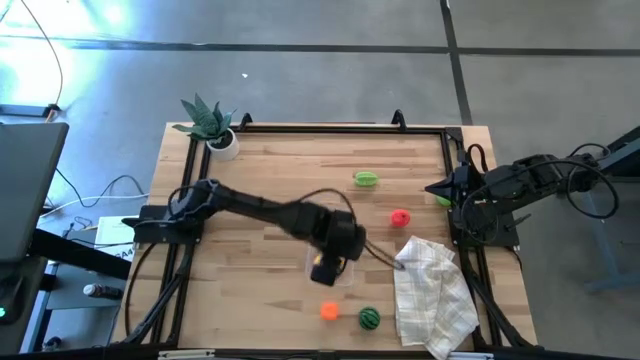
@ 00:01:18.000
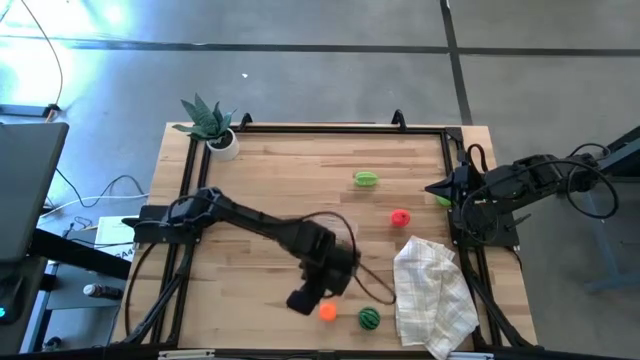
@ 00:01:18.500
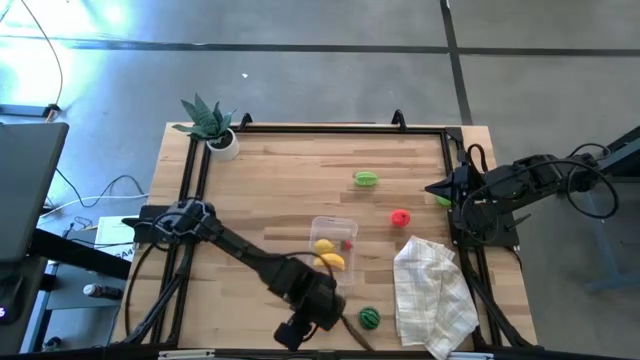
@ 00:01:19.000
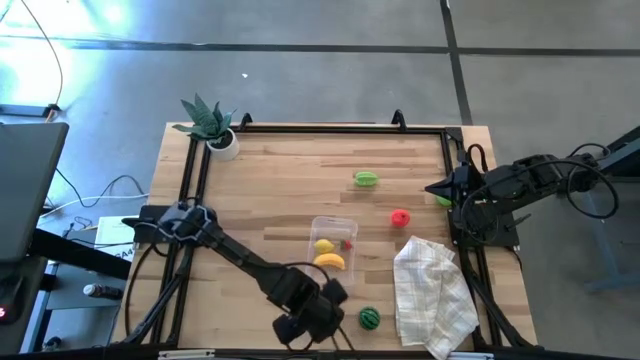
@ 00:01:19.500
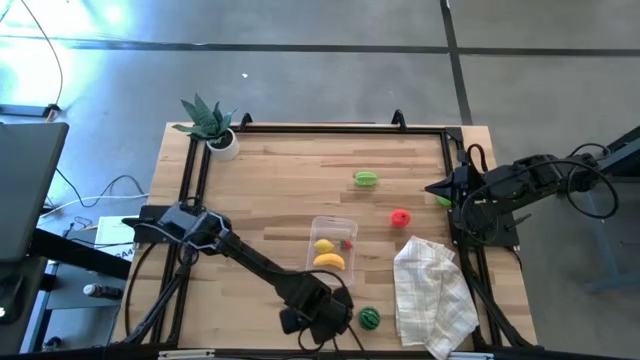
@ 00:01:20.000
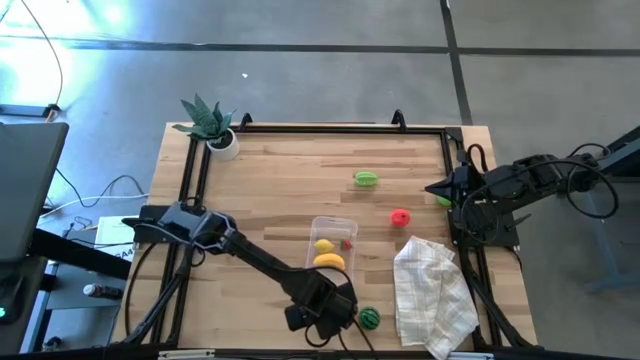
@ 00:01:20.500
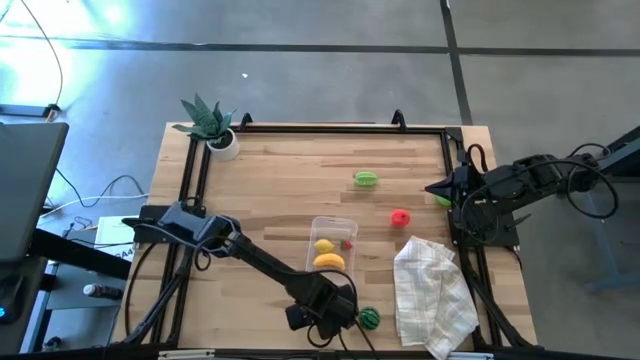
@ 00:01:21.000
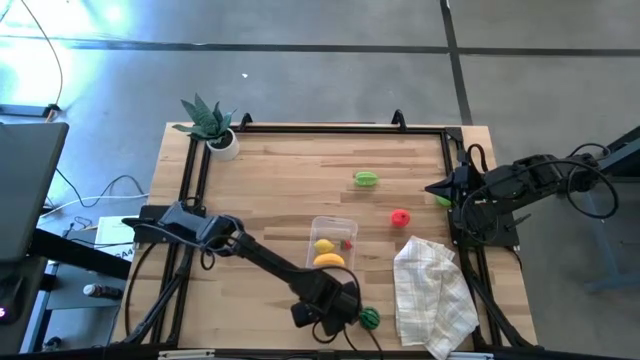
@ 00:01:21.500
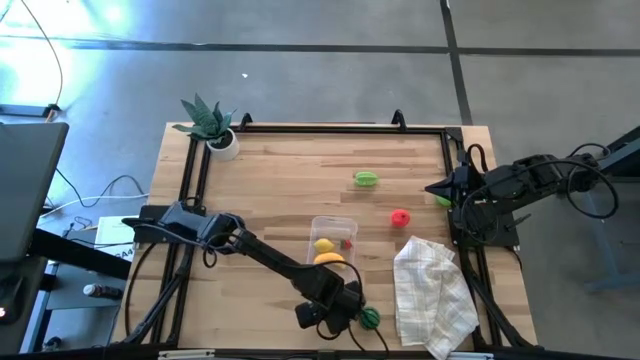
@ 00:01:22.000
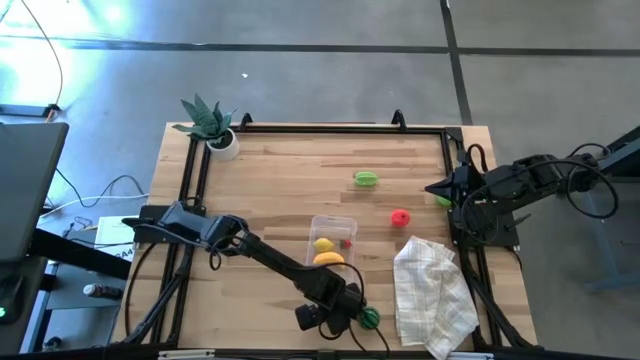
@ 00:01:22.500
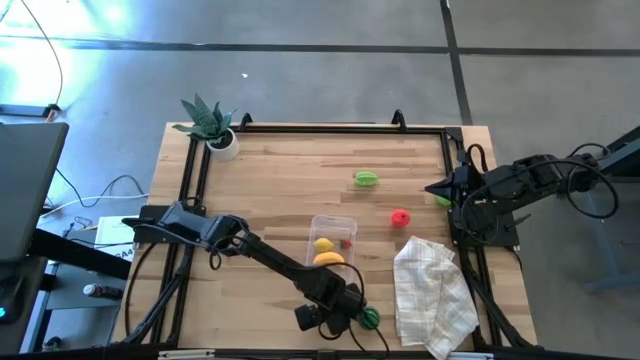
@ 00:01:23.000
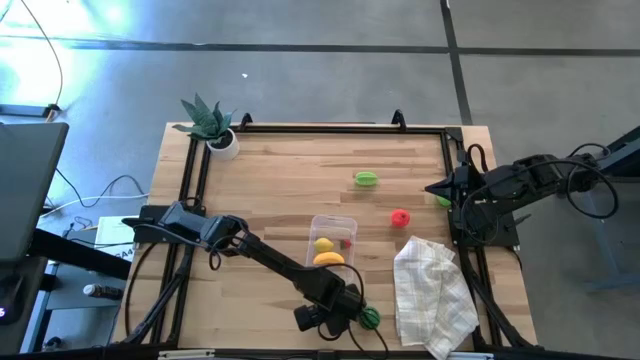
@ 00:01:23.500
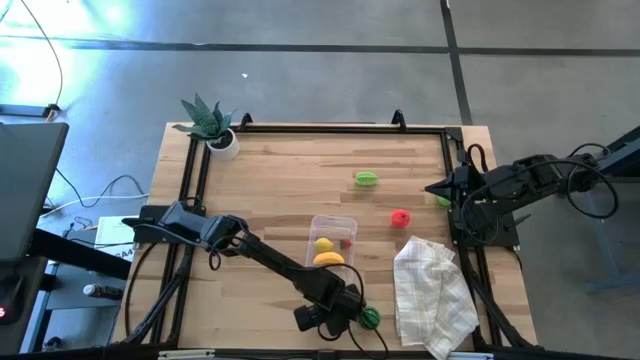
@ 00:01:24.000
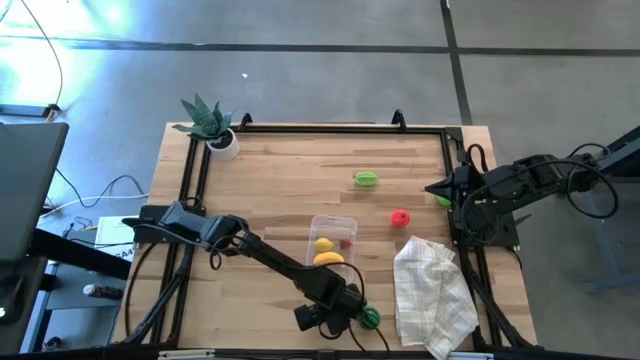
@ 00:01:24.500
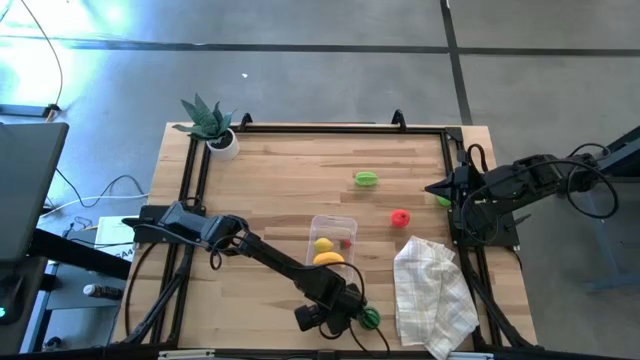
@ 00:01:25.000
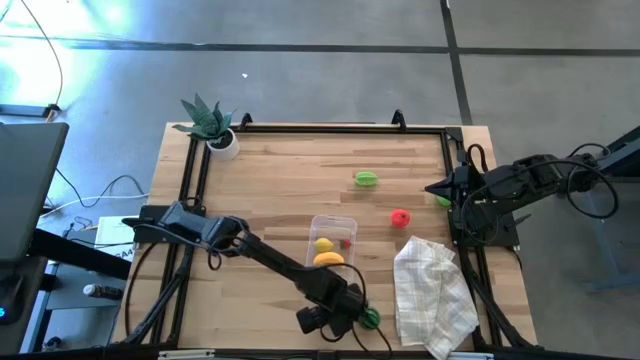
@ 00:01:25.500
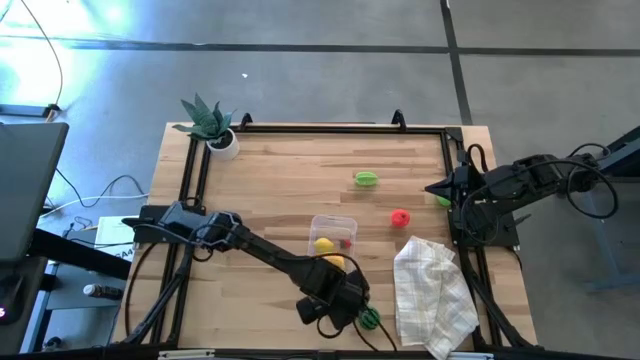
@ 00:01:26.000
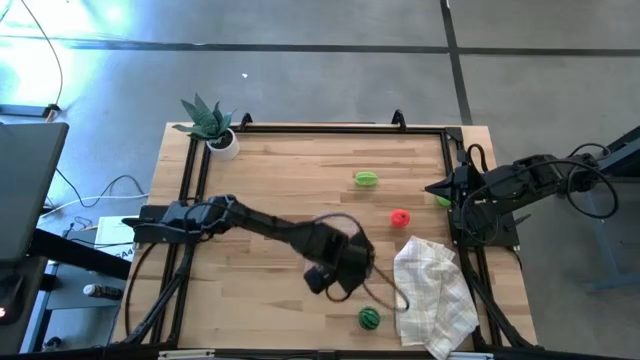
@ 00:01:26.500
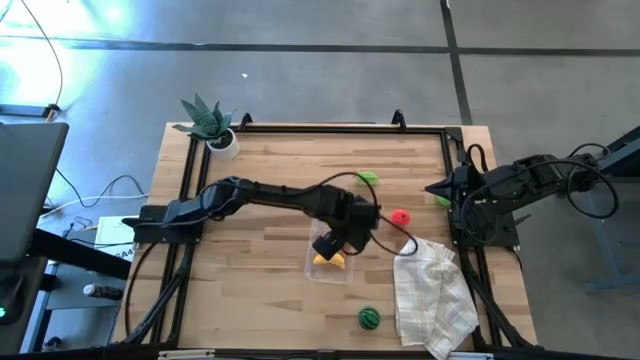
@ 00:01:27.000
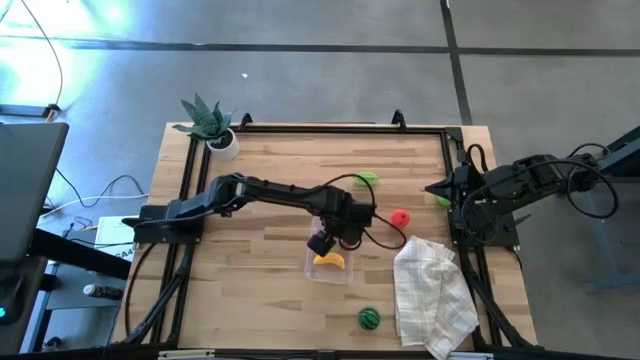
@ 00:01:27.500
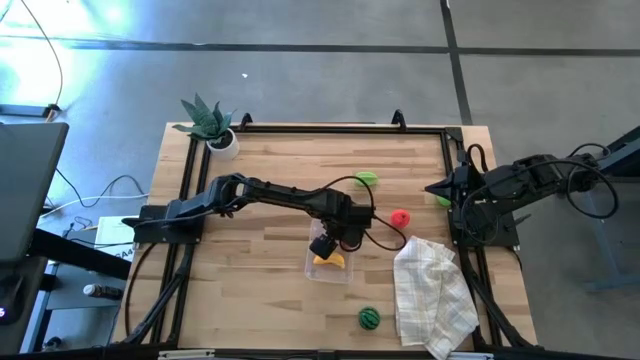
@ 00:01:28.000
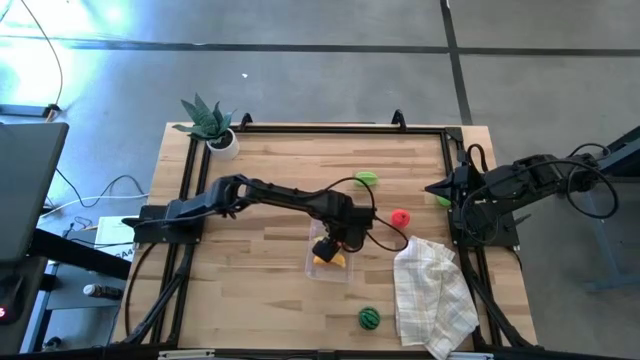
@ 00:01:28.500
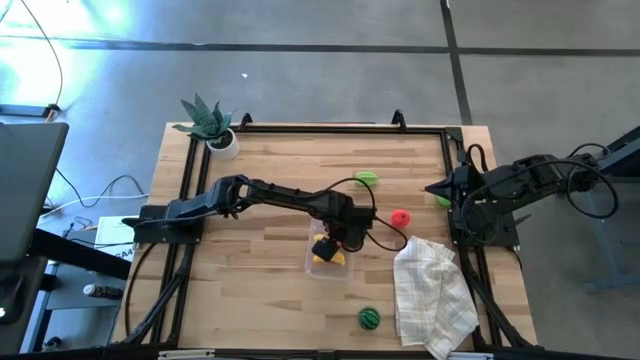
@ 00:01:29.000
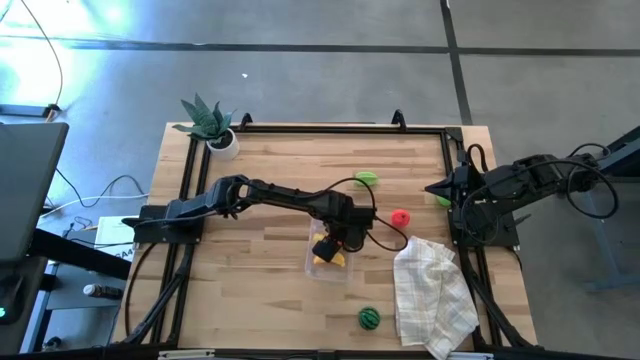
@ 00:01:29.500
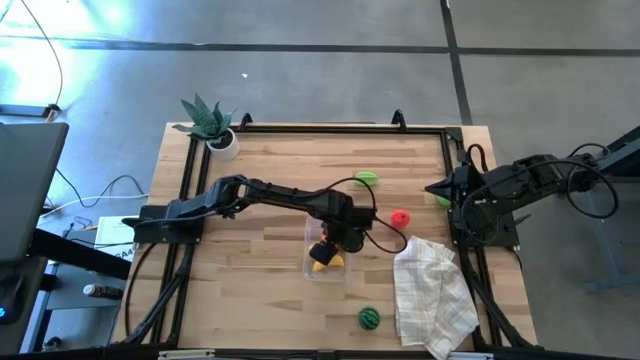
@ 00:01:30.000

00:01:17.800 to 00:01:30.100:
Task: Pick and placing Produce into tupperware
Put the pumpkin into the transparent bin
